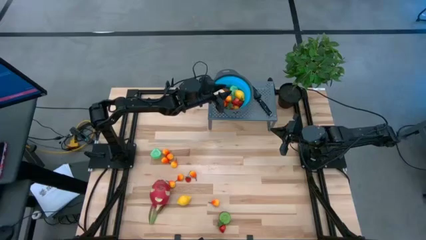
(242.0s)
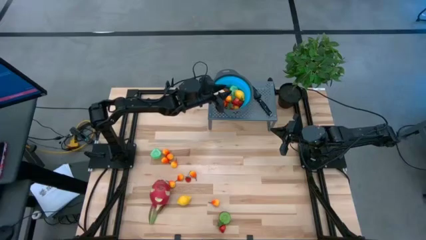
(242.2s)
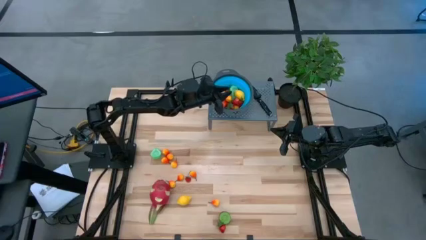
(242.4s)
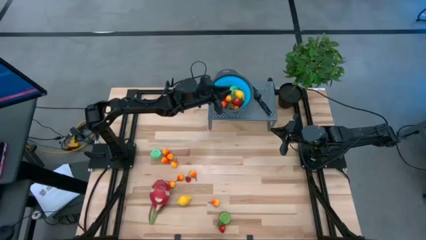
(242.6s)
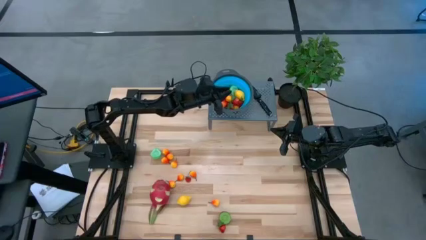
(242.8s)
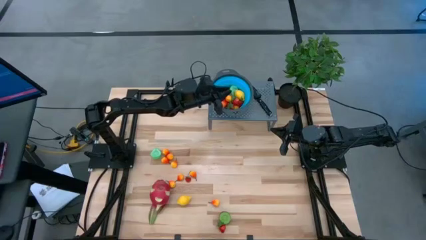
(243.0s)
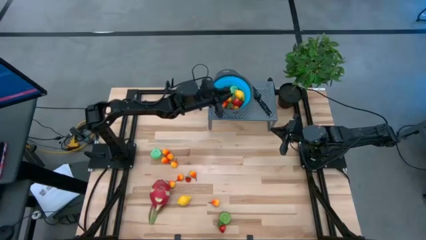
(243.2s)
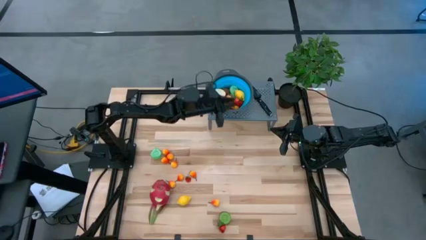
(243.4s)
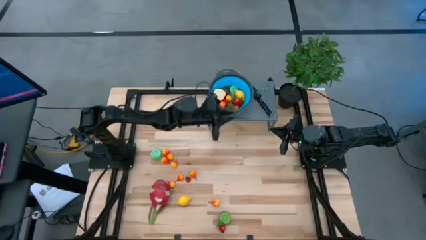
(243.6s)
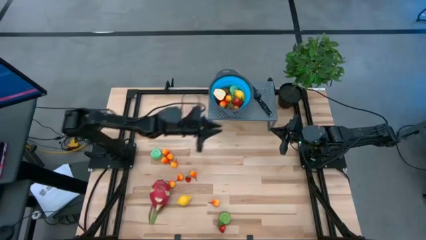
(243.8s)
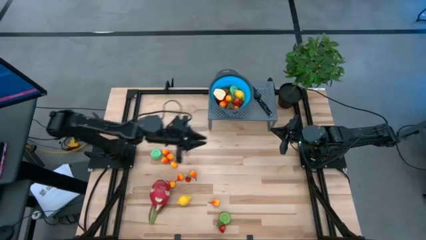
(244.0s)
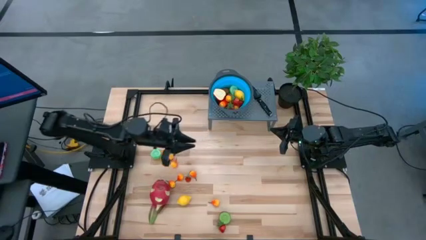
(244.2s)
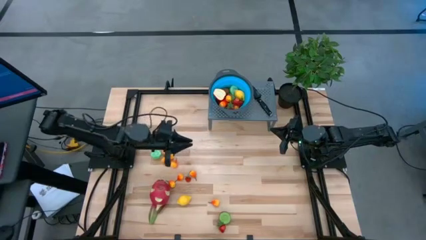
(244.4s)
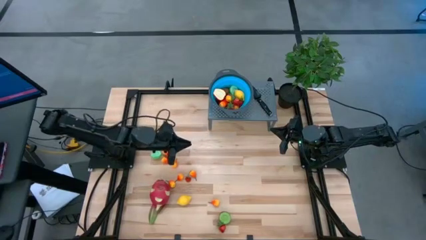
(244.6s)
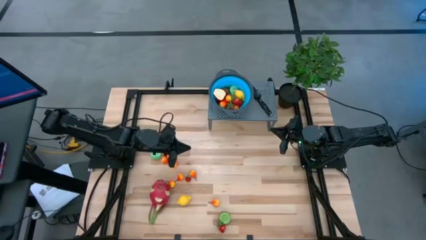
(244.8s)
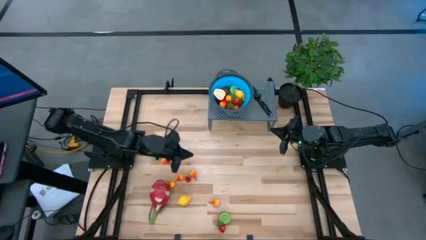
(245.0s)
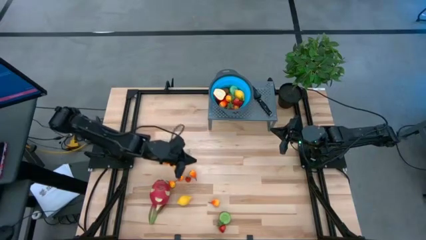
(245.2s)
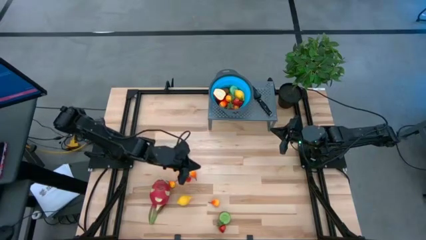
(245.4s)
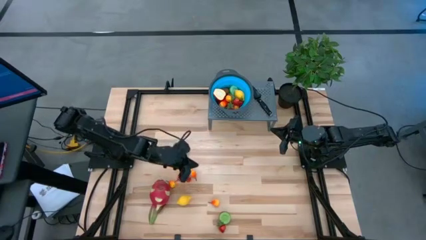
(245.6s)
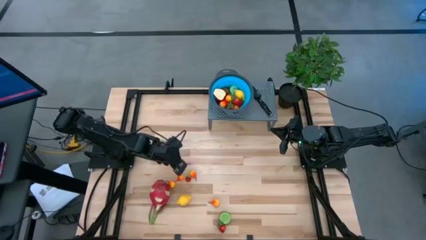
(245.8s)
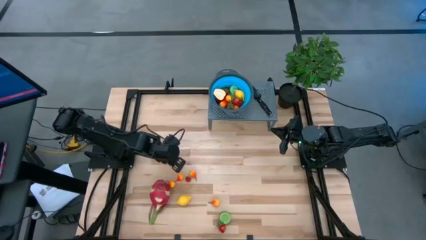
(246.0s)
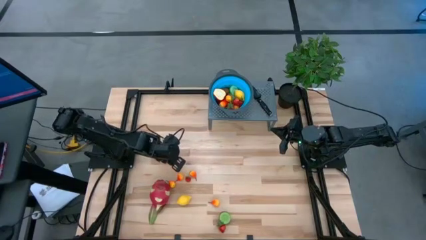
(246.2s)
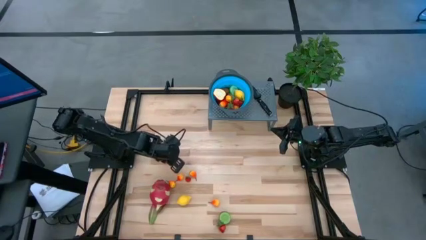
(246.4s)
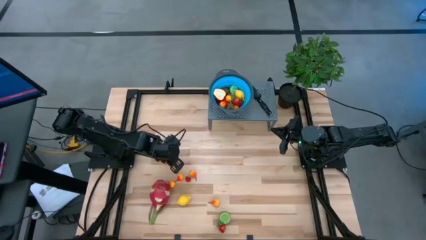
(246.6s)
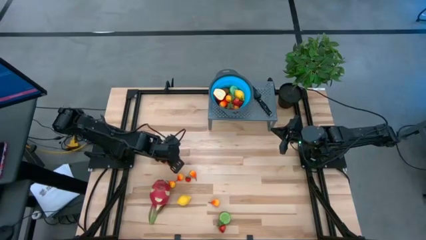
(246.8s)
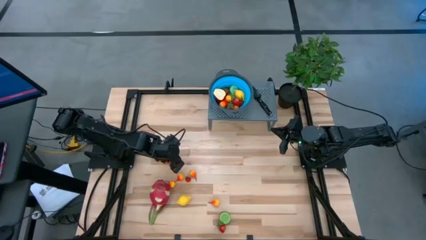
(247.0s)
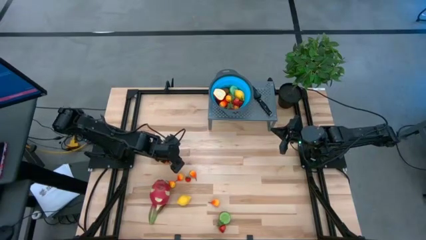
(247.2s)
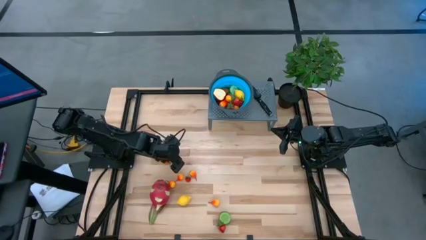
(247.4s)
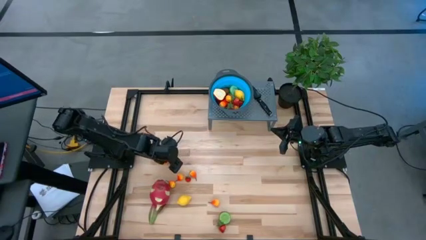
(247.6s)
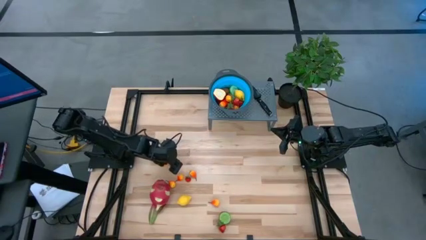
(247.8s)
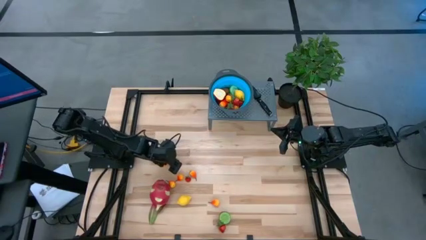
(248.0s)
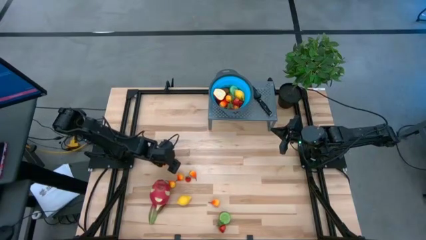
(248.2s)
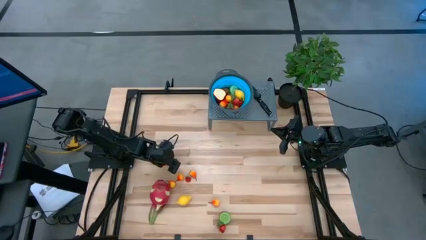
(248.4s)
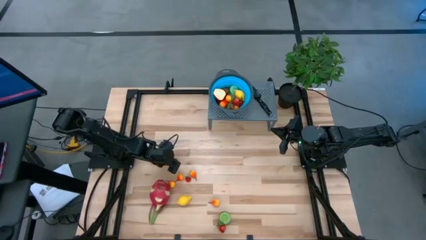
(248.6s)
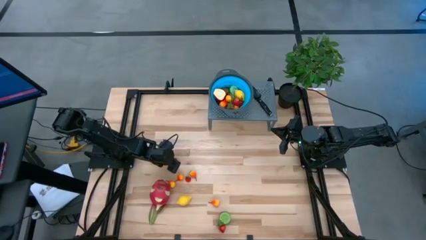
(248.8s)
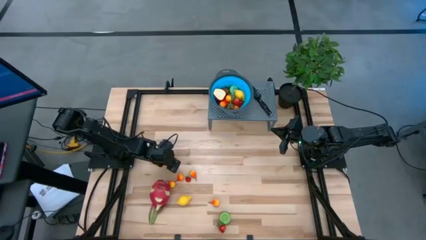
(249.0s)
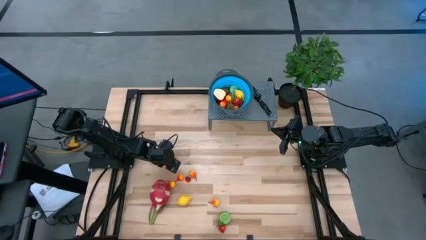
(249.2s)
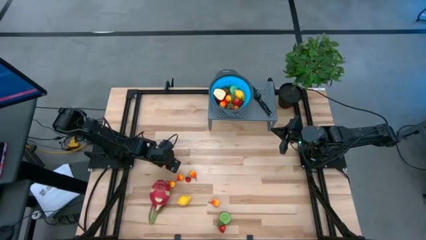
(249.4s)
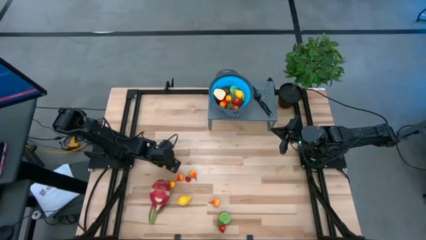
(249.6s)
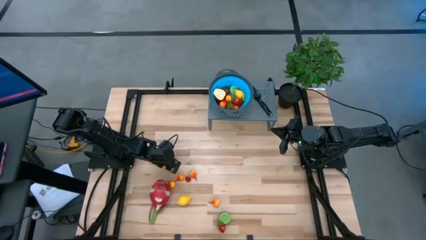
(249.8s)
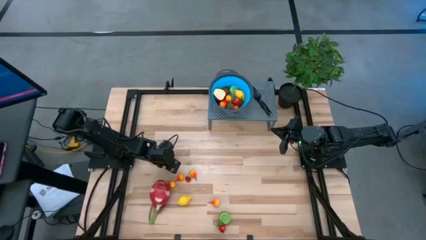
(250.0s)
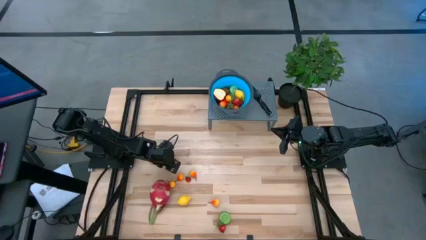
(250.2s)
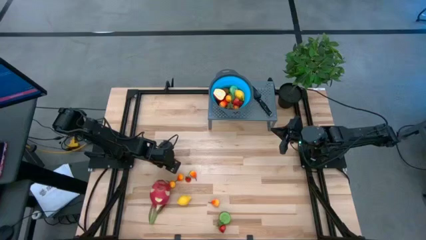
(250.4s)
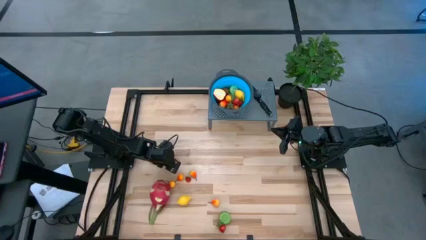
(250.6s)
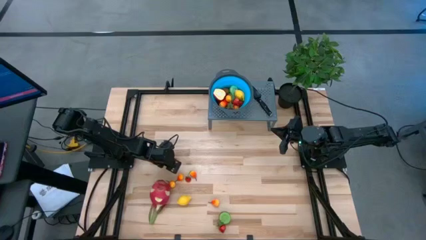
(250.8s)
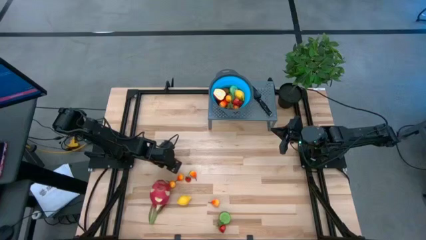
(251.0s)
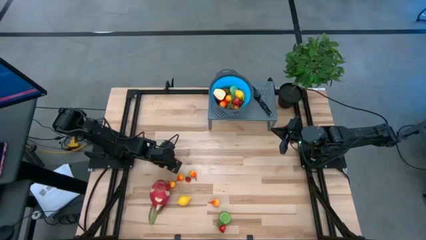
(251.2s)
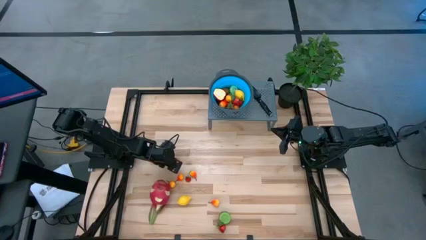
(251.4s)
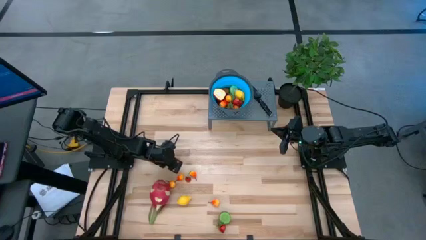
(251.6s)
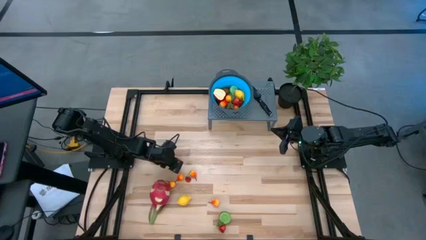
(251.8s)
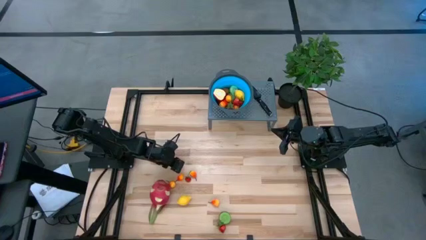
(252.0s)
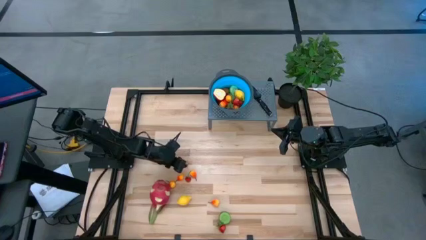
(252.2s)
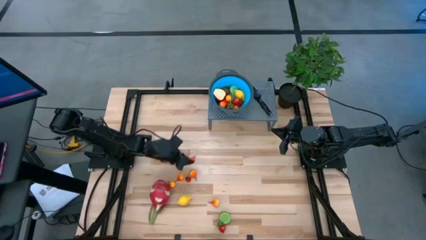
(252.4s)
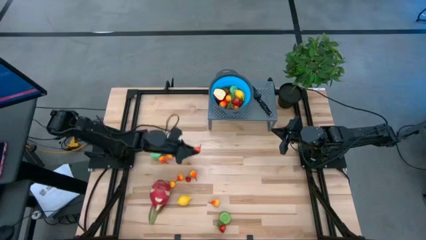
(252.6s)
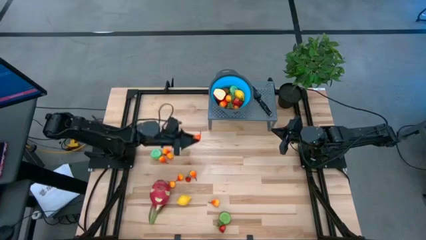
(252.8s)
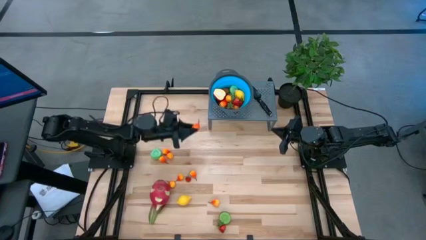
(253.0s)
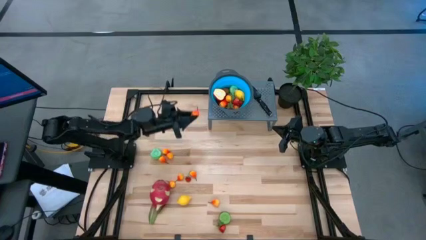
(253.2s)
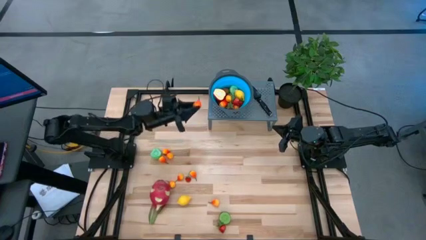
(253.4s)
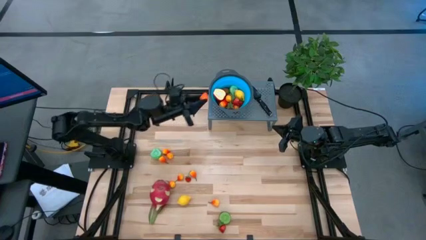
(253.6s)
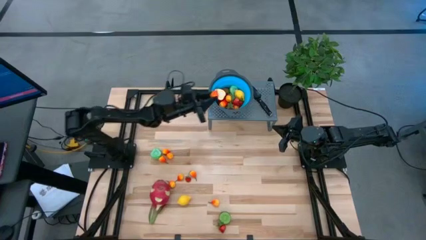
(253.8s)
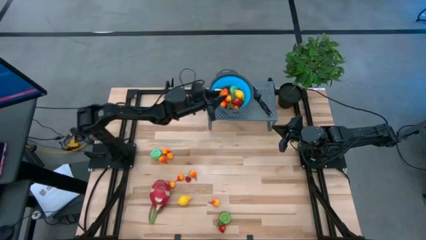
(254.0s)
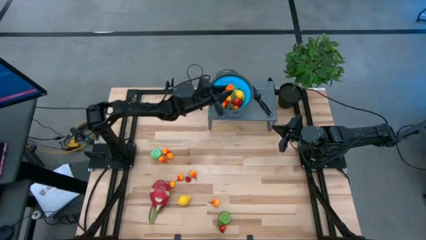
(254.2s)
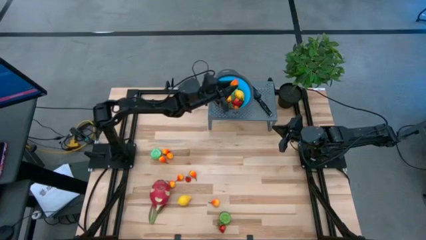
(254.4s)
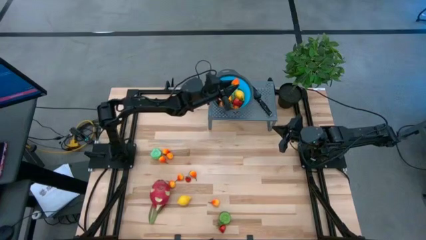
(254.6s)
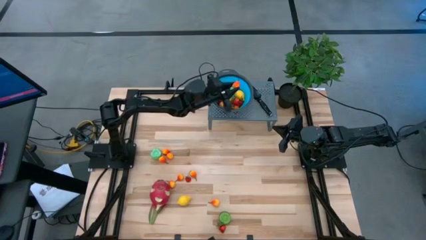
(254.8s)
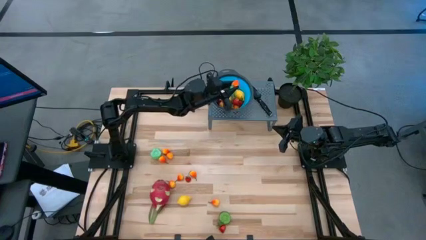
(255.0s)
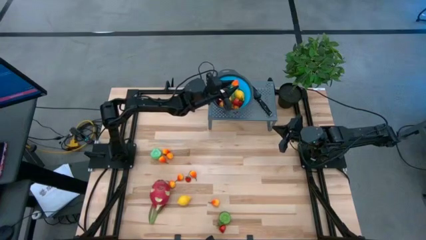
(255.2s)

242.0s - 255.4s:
Task: Pick & Place Fruit
Put the yellow pear into the strainer bowl

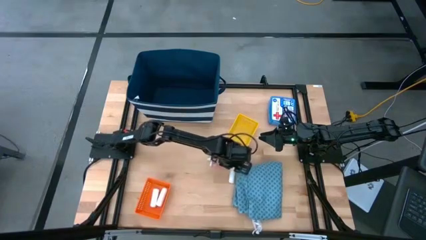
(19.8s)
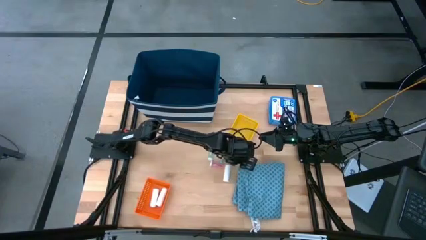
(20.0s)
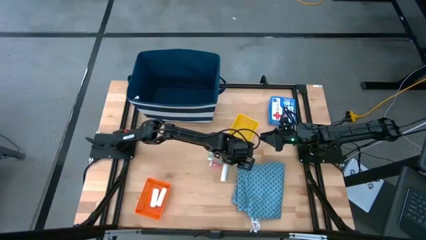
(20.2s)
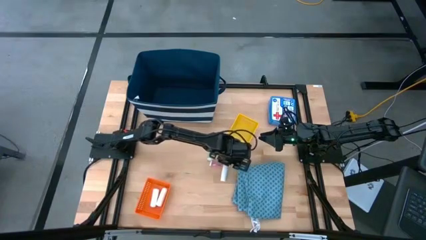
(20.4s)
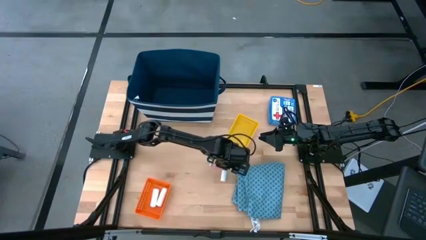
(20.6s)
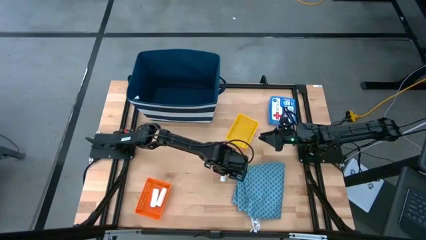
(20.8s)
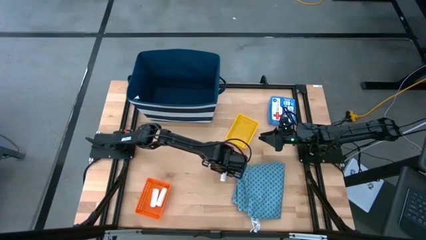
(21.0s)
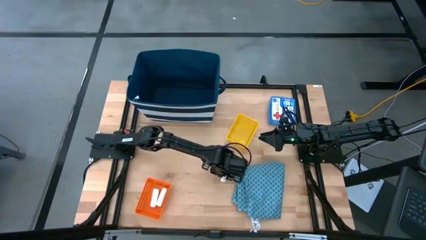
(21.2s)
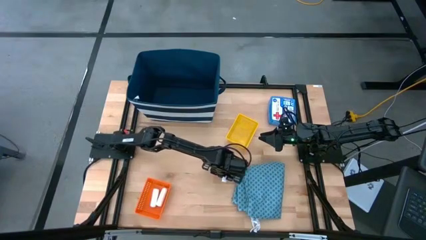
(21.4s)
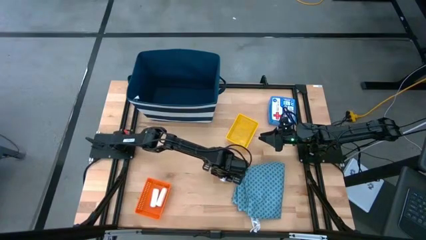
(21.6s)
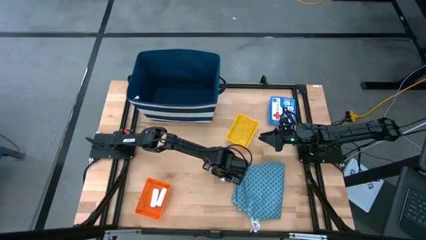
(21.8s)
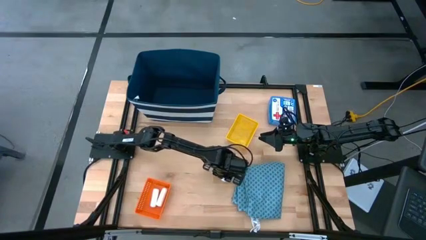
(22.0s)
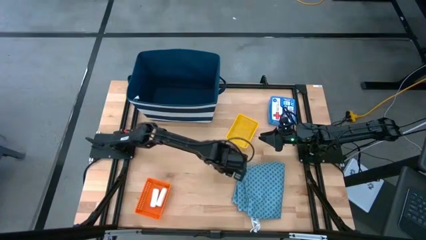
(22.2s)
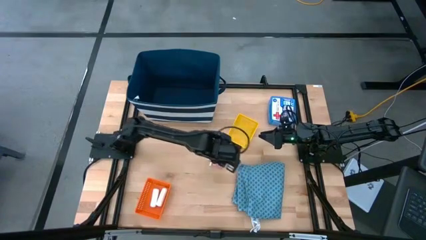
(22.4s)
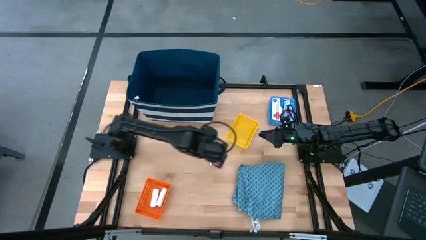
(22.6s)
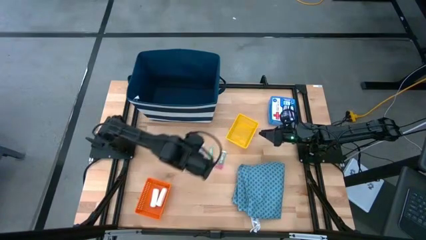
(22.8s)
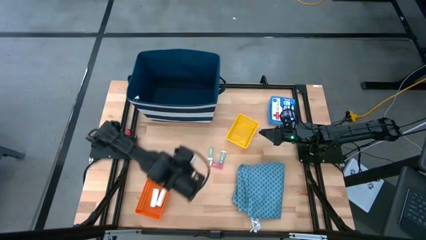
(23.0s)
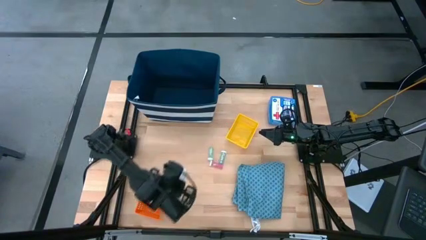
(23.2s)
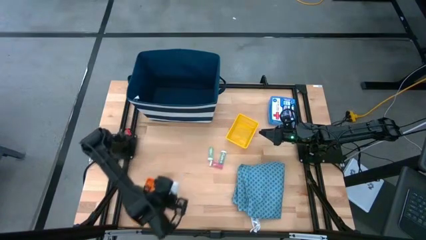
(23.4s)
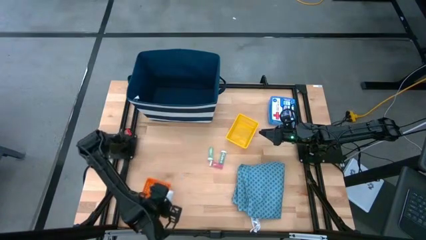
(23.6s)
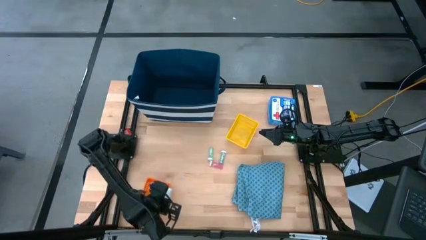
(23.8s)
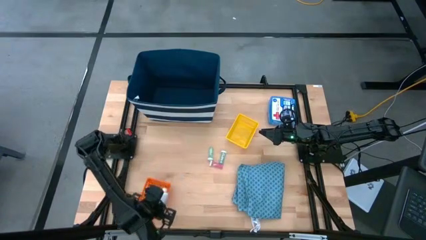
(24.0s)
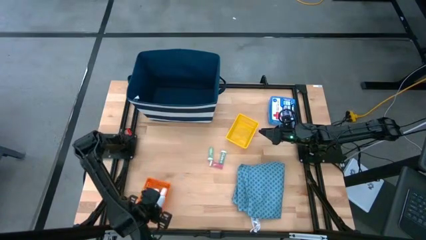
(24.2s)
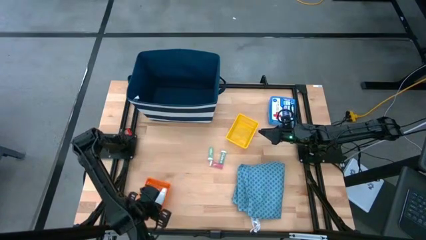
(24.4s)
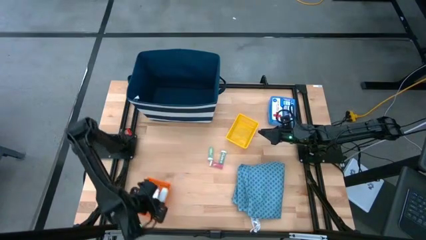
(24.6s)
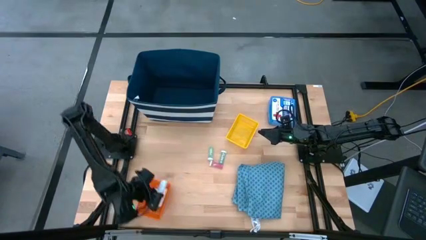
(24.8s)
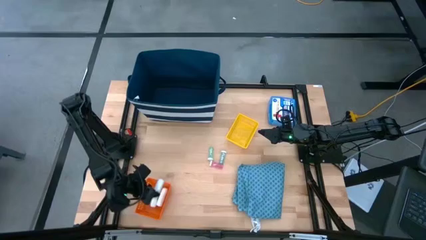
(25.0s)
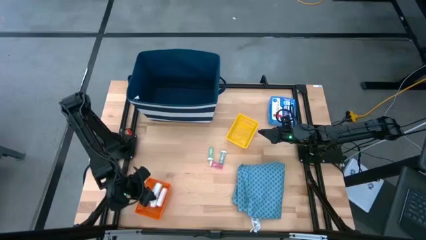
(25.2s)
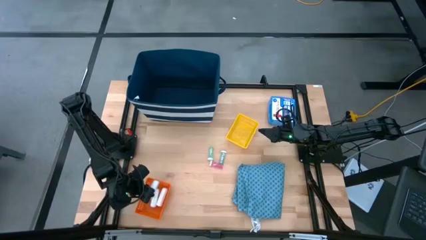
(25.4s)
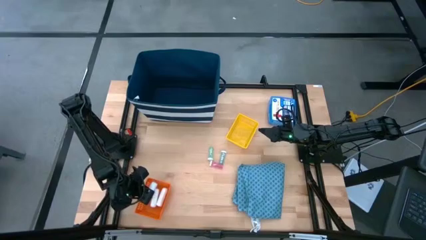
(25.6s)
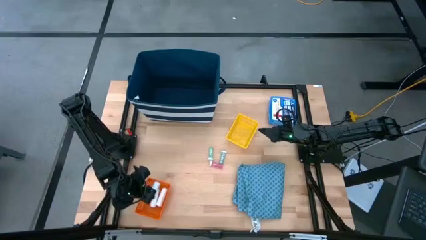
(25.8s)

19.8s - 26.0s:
Task: Pick & place medical supplies in basket/bin
Put the white gauze in the orange bin
